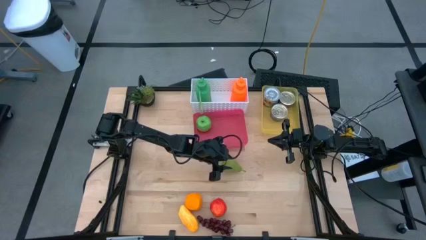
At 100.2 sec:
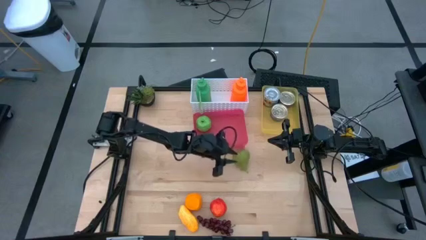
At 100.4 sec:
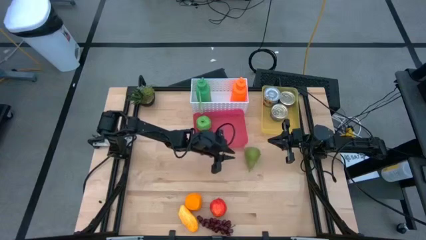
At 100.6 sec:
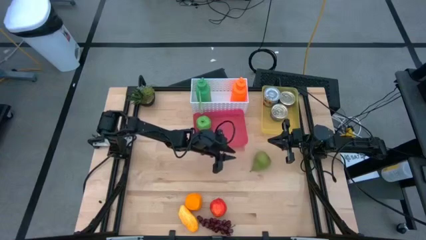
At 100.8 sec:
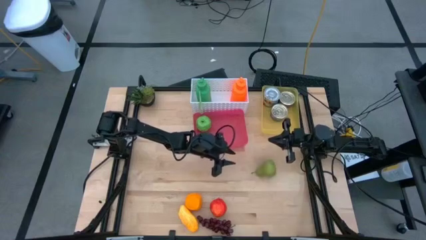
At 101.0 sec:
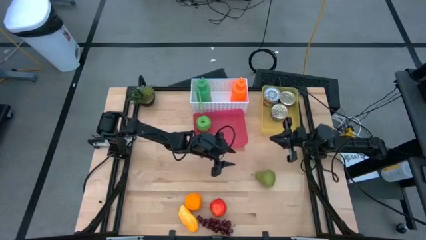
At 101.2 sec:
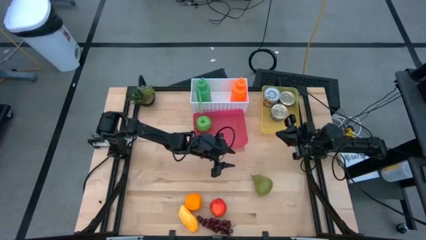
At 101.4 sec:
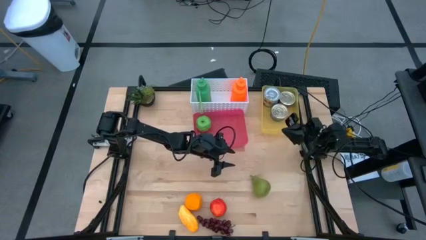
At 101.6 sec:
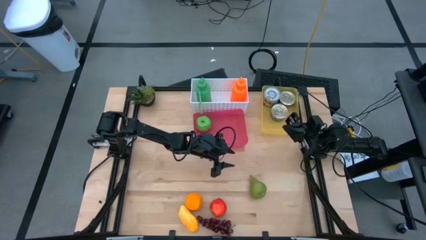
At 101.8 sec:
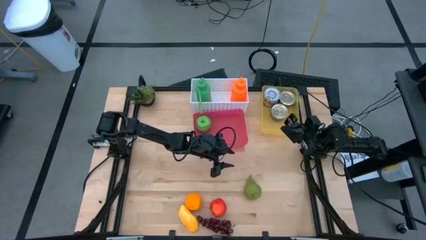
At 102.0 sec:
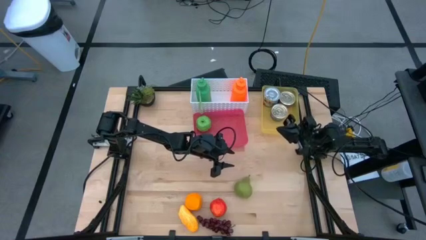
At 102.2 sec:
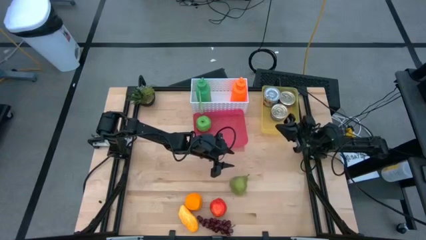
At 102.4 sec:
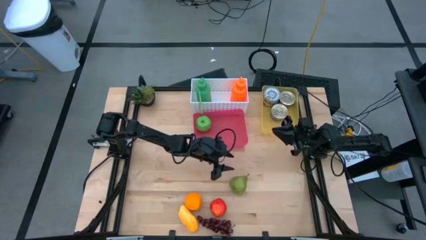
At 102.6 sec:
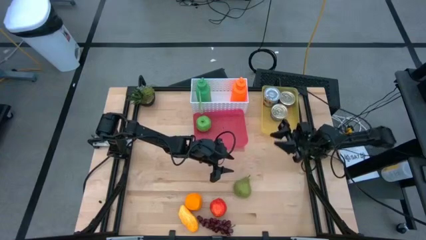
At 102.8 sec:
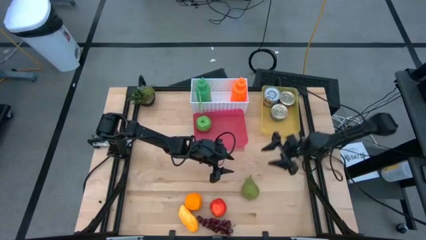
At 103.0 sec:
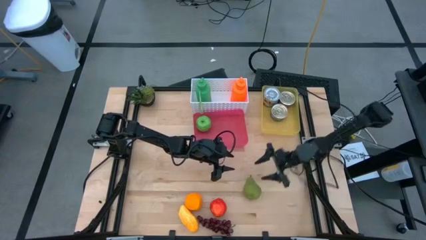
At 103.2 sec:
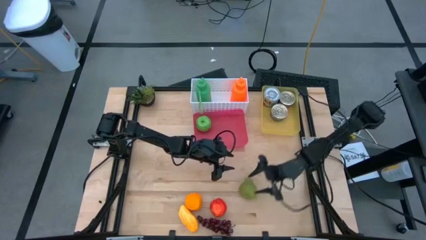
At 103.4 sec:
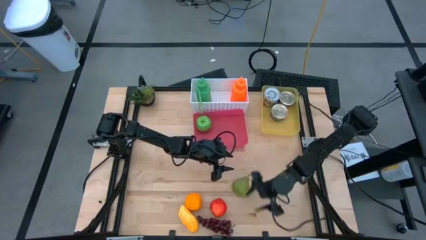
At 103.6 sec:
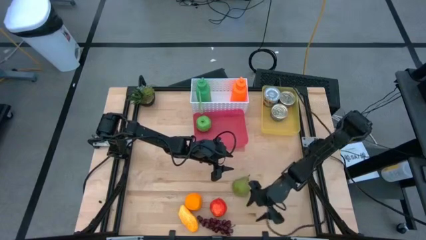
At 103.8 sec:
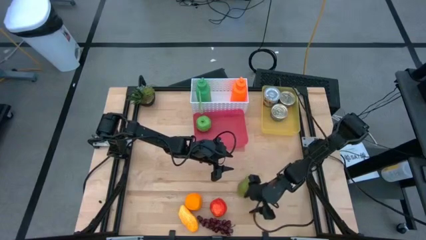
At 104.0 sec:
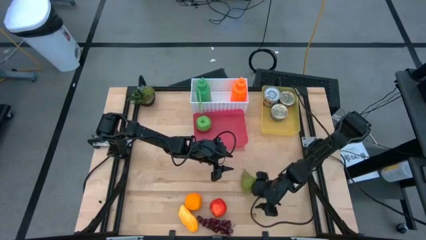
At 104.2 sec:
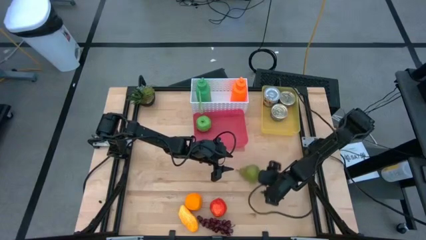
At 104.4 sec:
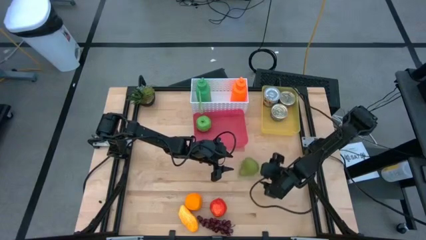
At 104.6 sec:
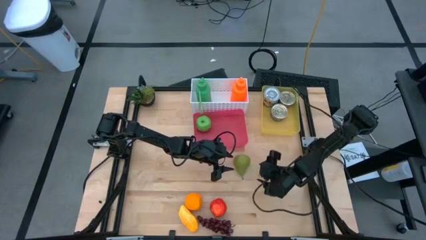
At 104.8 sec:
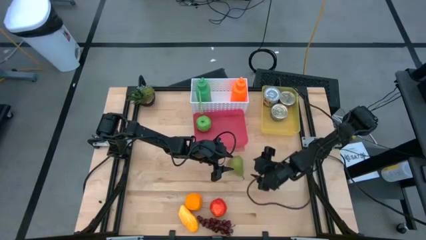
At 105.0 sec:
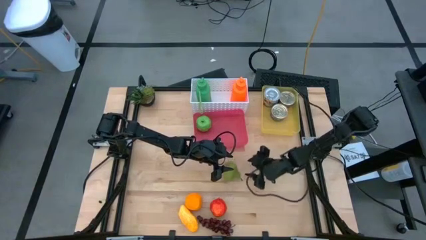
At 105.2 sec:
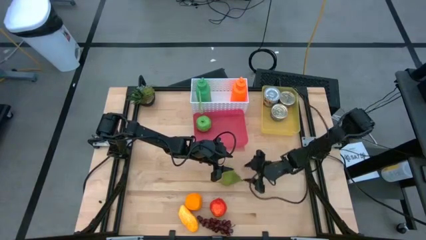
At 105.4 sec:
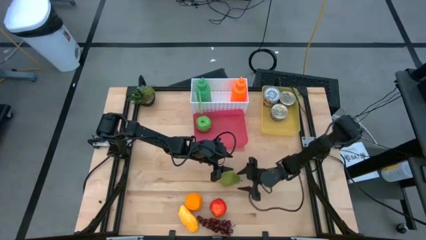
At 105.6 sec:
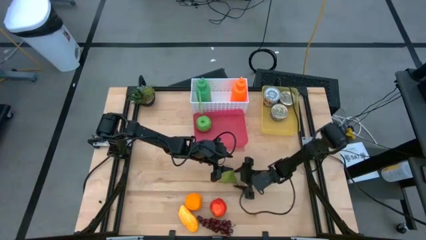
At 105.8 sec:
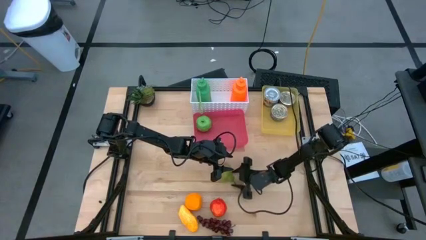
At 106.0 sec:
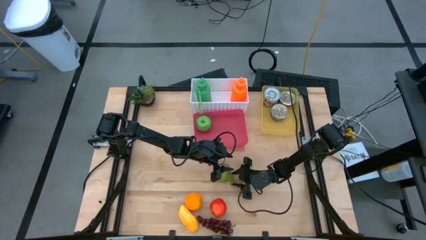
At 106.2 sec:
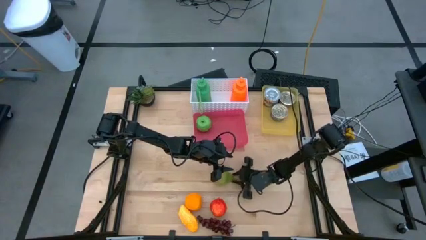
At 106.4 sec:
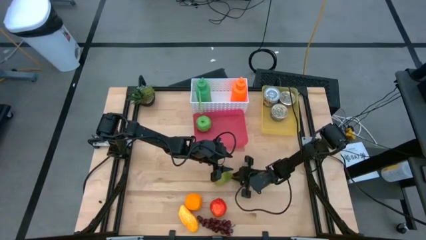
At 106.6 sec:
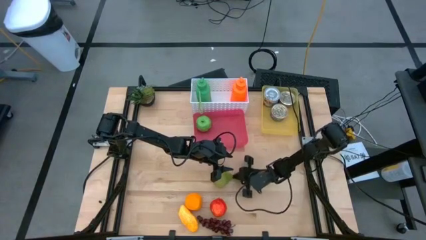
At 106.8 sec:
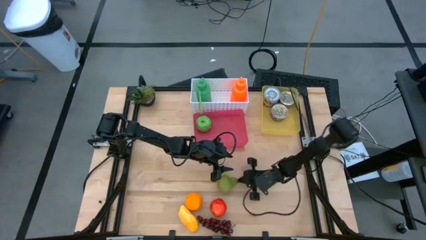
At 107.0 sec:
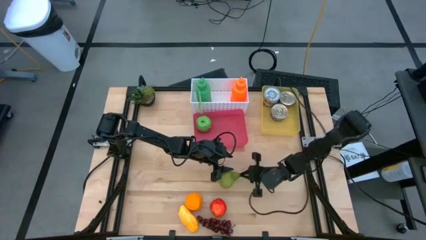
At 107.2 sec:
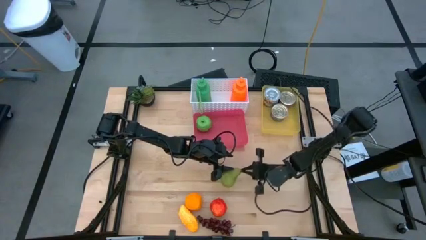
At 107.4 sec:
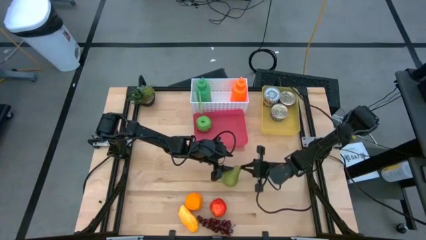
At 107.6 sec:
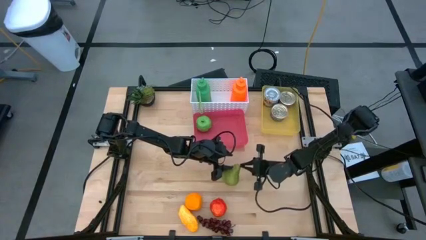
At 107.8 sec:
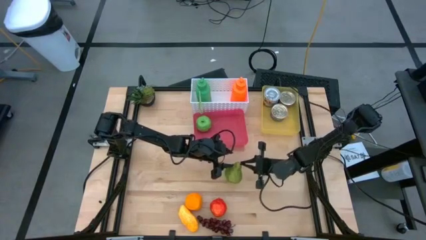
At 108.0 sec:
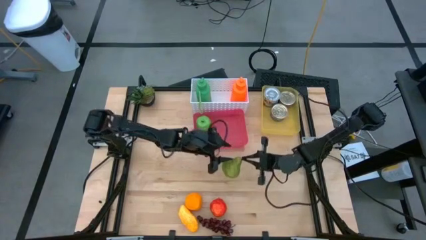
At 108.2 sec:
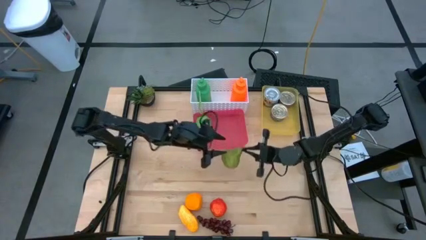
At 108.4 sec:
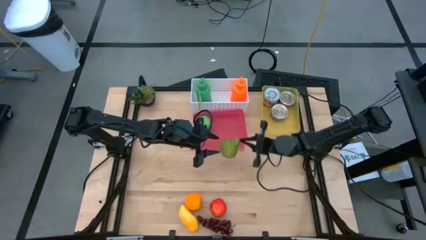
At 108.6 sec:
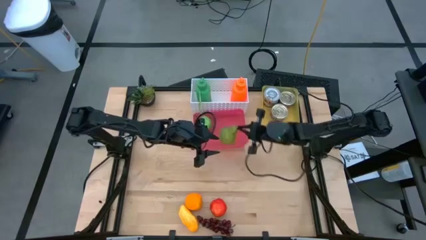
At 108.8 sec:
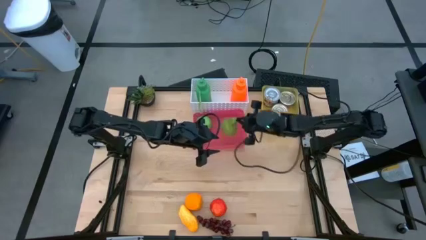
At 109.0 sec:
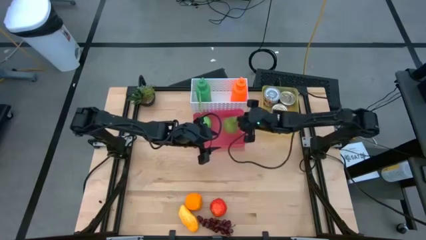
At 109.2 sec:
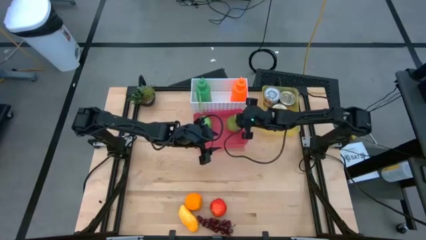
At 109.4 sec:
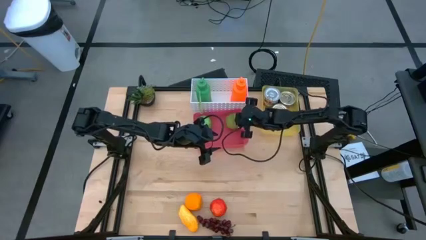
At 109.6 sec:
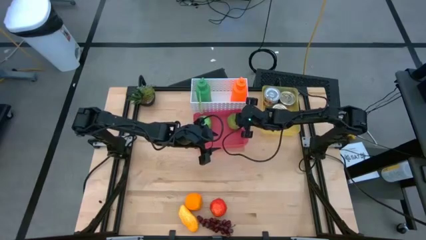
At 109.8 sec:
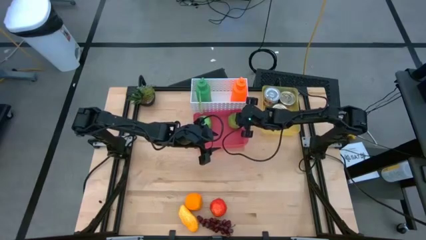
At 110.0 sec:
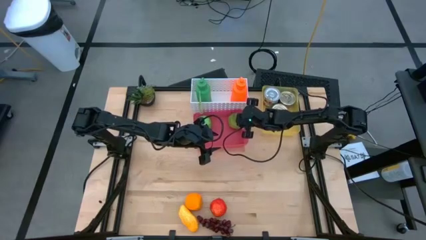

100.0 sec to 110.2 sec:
Task: Pick & Place Food Item
Put the green pear into the red bin

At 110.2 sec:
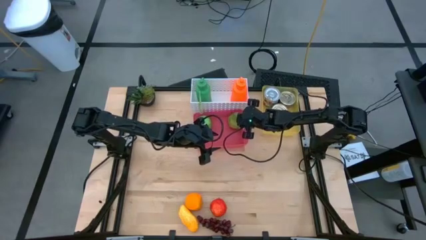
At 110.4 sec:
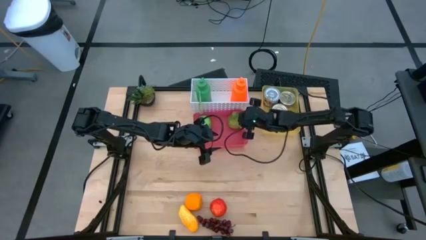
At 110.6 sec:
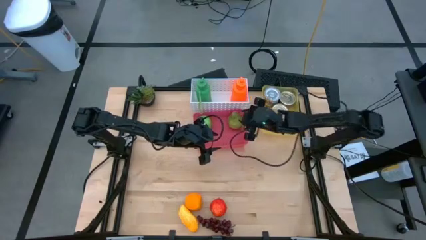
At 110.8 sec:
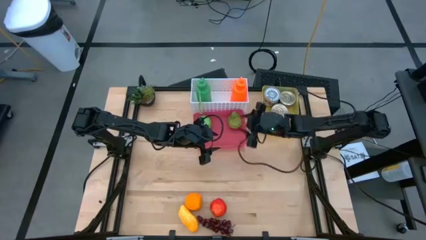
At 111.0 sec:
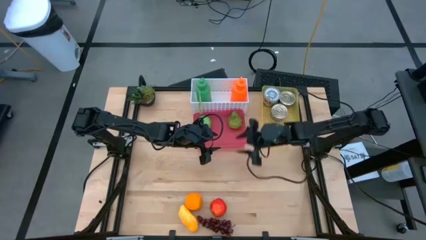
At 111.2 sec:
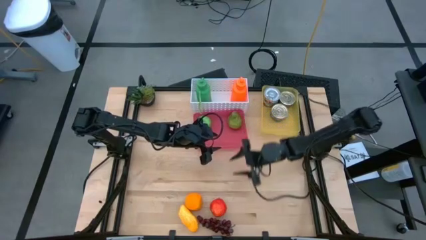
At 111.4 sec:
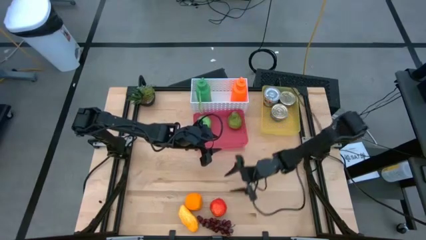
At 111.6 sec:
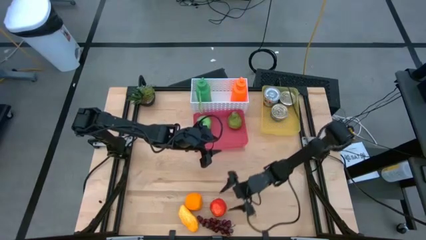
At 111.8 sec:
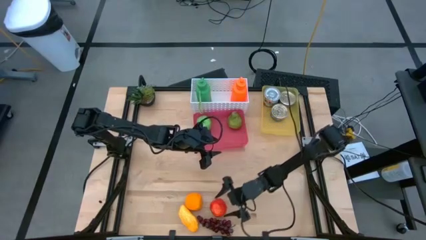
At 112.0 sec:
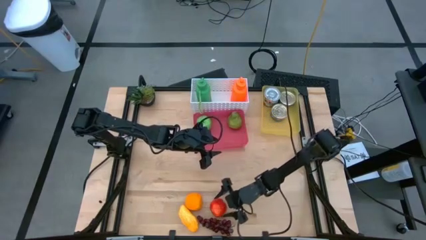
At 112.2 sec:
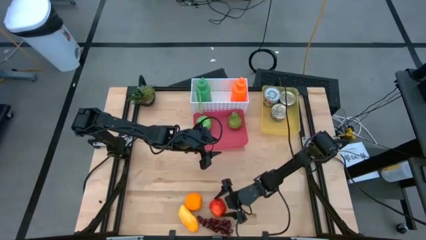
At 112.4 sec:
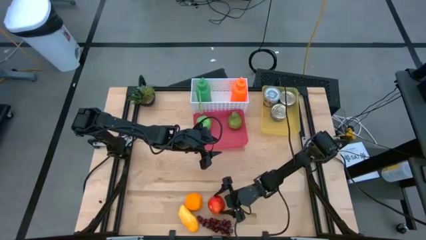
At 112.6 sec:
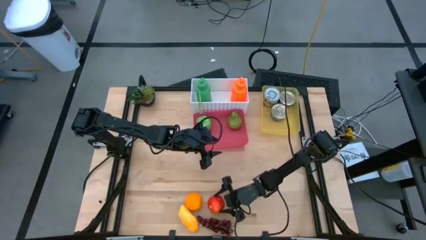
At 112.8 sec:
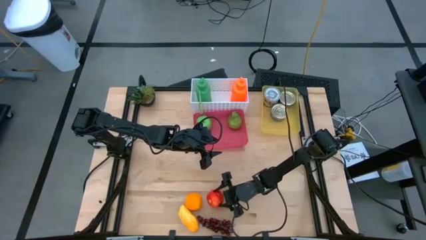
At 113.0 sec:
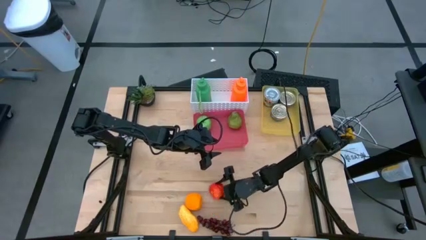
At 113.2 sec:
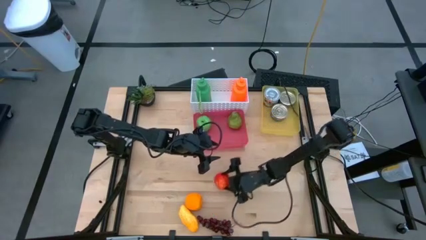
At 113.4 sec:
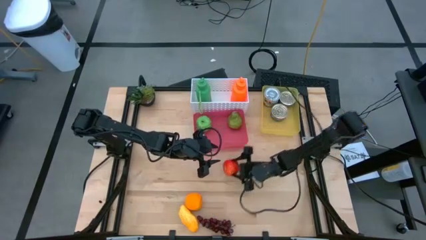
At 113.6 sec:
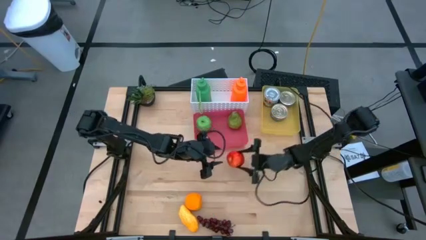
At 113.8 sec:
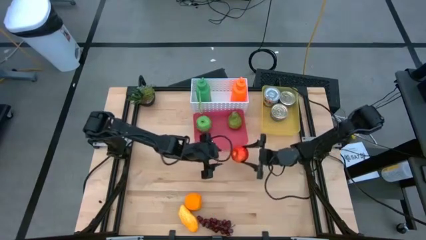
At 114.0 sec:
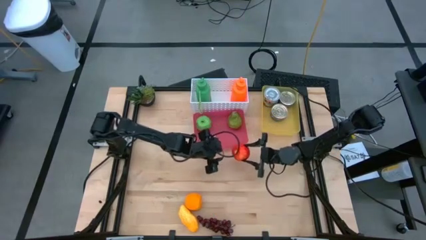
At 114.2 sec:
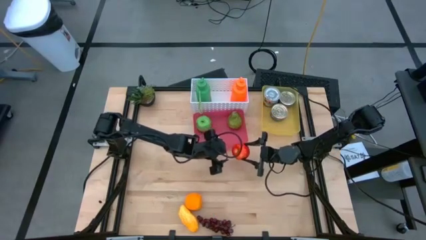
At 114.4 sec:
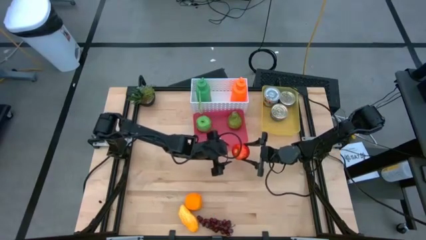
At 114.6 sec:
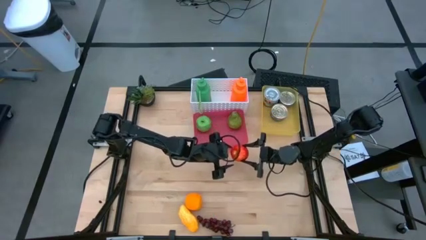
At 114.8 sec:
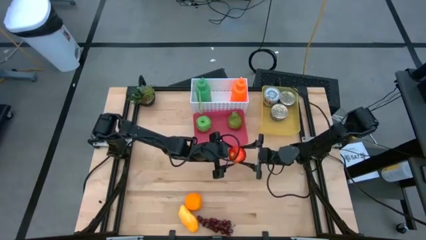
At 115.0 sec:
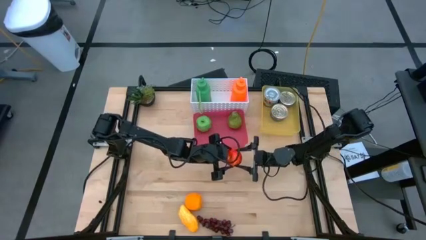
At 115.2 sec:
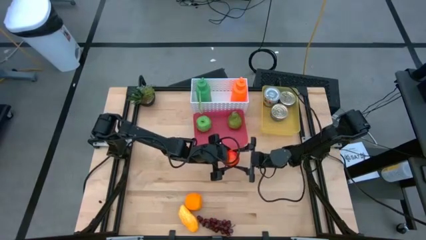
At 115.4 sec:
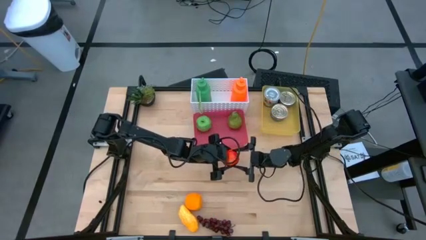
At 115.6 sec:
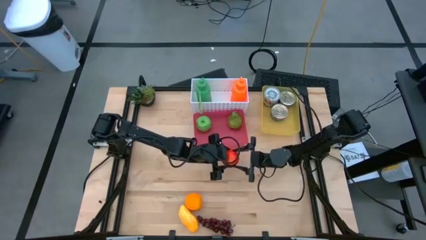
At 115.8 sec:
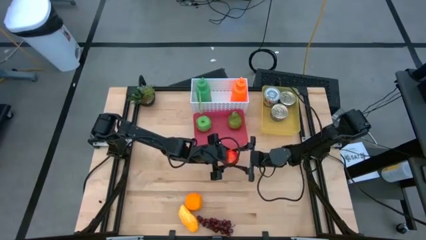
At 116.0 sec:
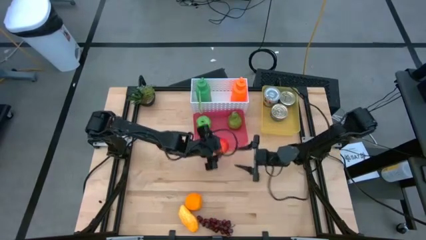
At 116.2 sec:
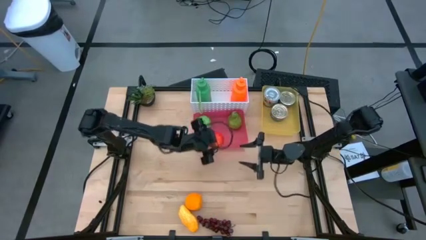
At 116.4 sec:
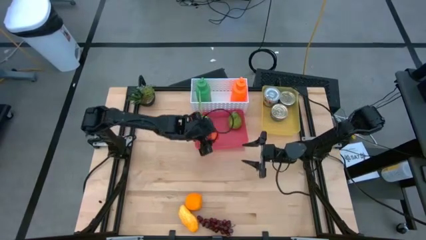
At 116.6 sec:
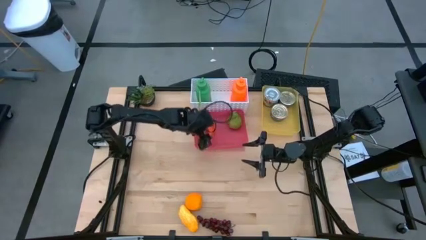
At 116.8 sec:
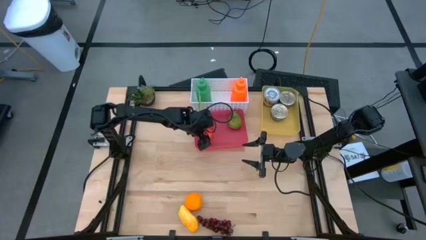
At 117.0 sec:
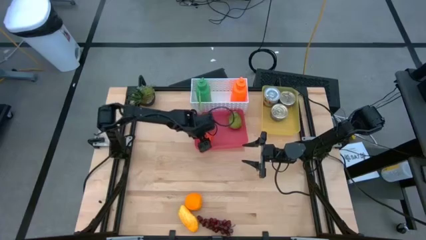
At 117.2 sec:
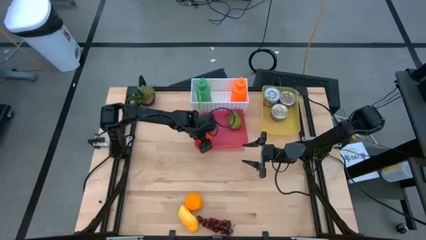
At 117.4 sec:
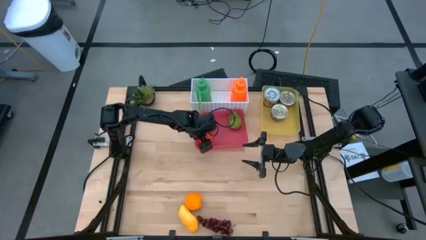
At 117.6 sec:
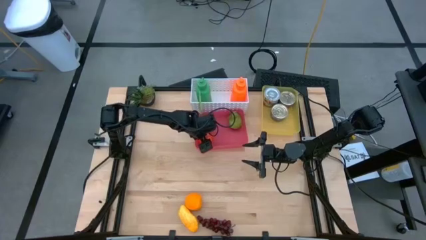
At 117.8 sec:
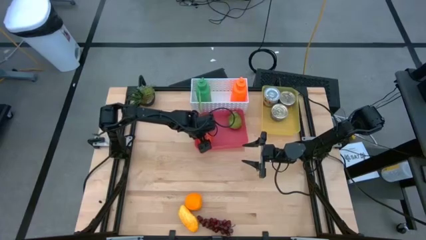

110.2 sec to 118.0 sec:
Put the red apple into the red bin
